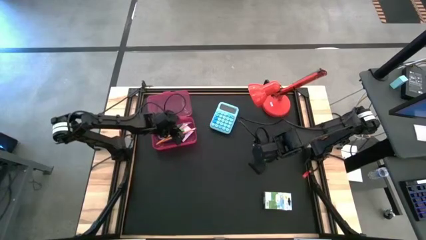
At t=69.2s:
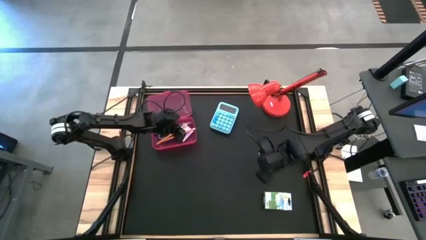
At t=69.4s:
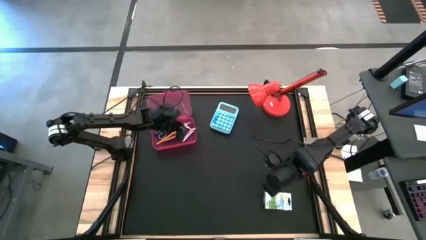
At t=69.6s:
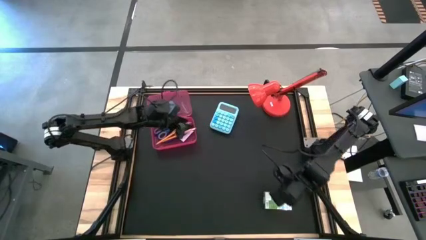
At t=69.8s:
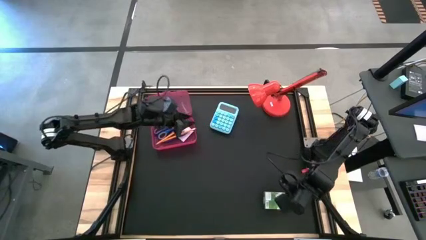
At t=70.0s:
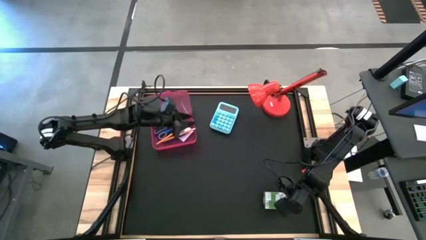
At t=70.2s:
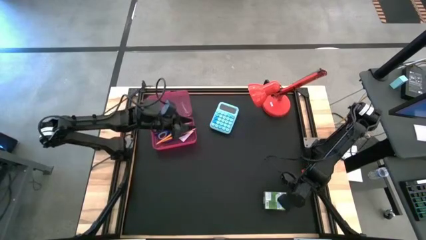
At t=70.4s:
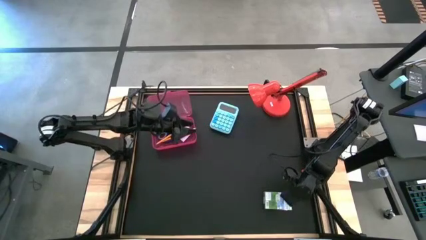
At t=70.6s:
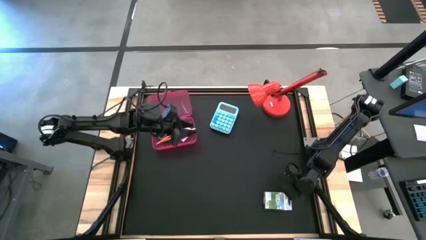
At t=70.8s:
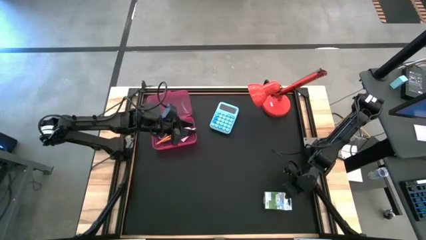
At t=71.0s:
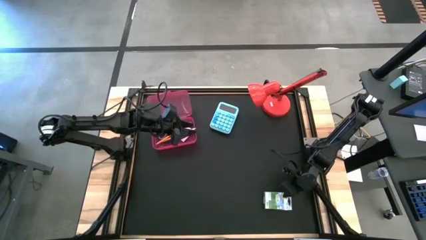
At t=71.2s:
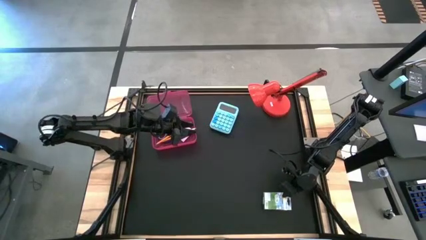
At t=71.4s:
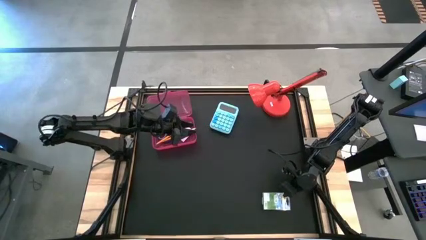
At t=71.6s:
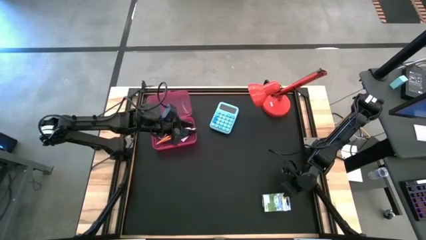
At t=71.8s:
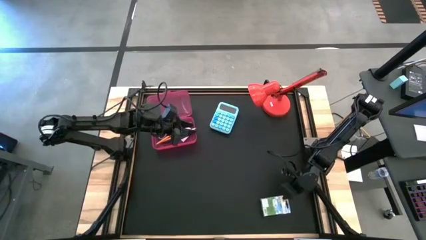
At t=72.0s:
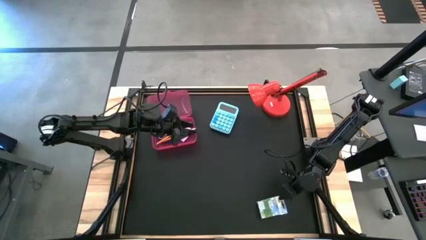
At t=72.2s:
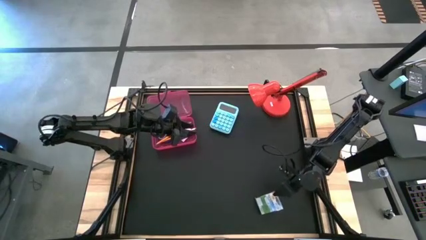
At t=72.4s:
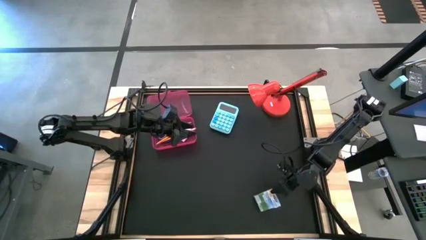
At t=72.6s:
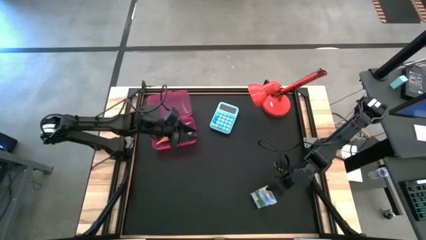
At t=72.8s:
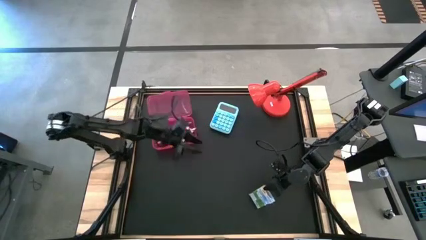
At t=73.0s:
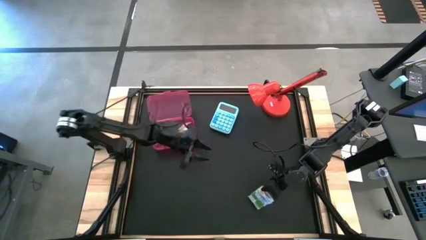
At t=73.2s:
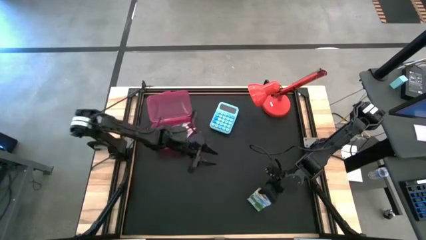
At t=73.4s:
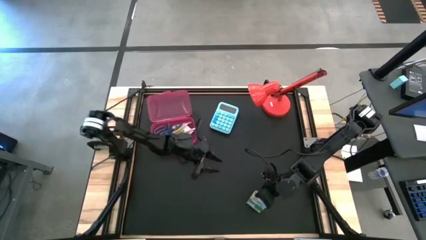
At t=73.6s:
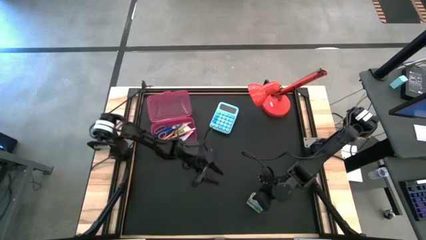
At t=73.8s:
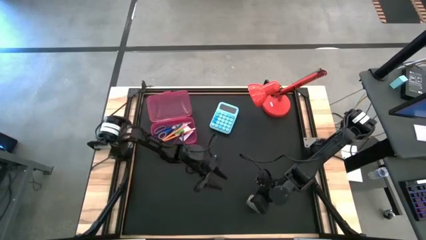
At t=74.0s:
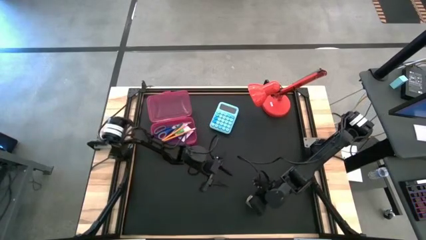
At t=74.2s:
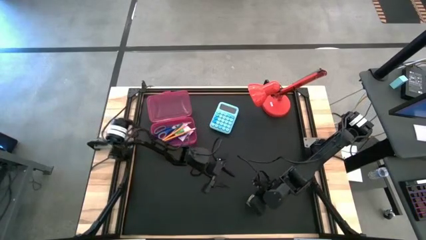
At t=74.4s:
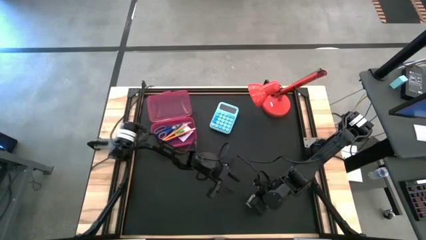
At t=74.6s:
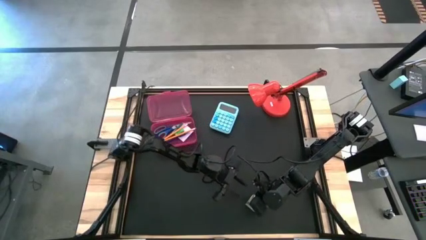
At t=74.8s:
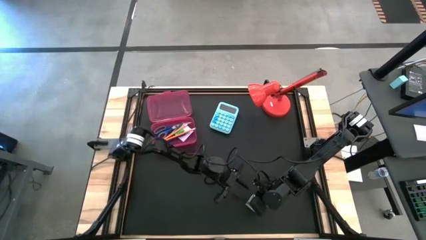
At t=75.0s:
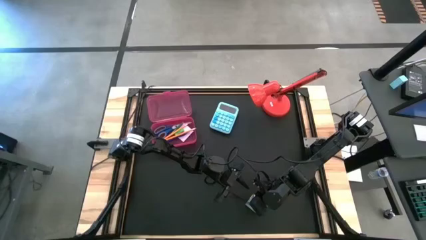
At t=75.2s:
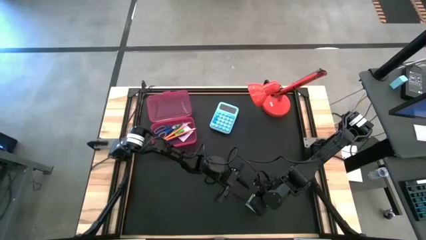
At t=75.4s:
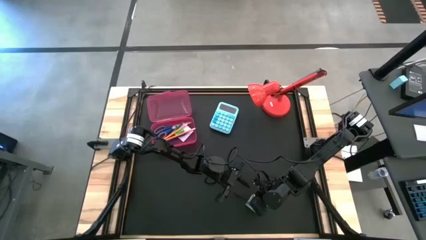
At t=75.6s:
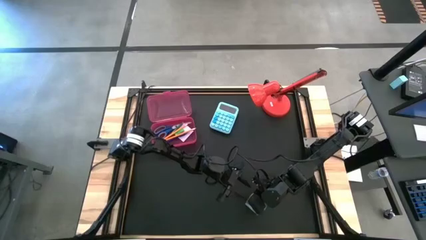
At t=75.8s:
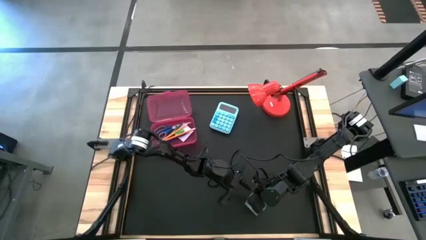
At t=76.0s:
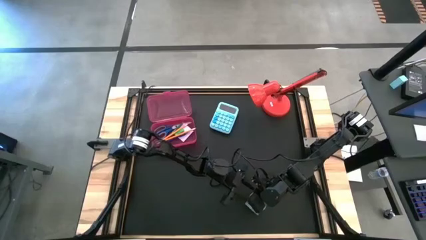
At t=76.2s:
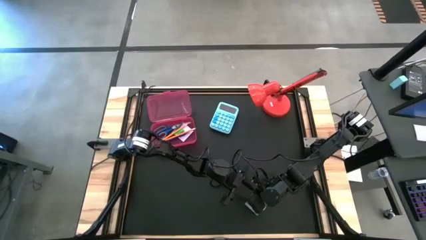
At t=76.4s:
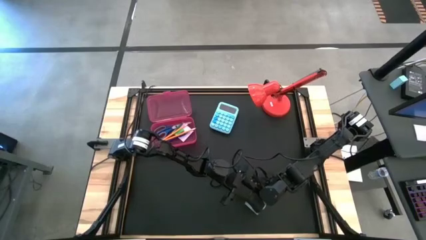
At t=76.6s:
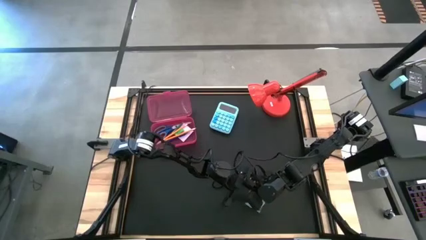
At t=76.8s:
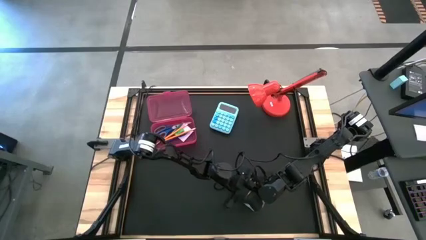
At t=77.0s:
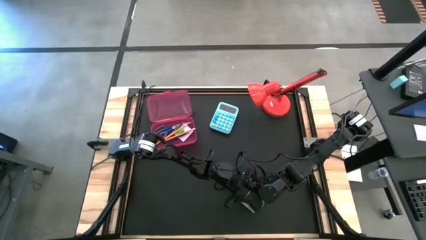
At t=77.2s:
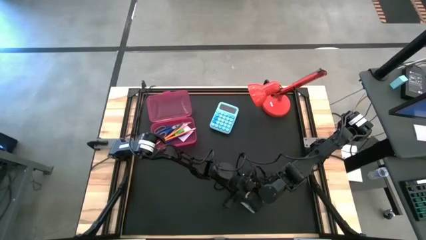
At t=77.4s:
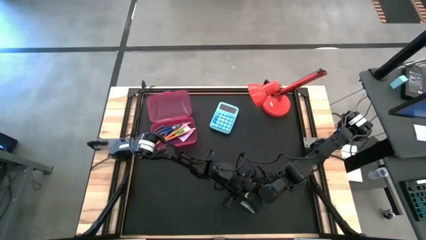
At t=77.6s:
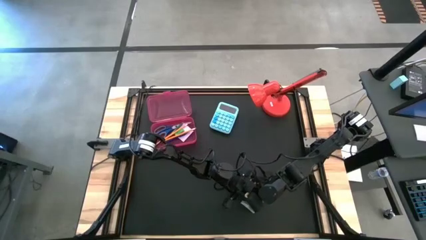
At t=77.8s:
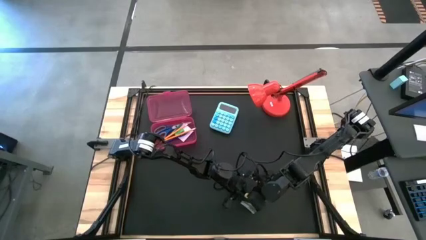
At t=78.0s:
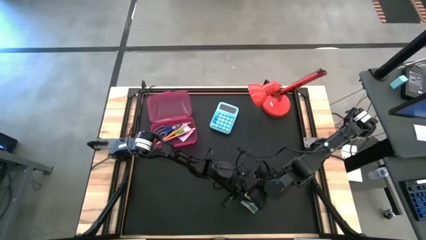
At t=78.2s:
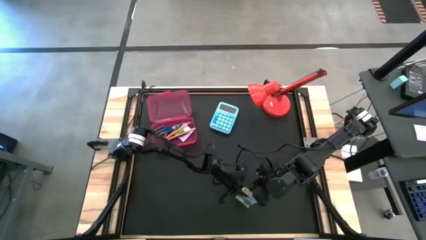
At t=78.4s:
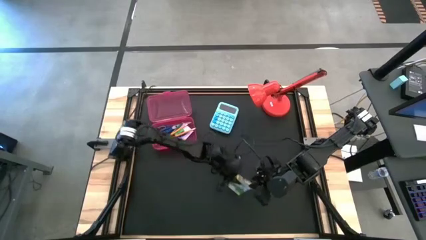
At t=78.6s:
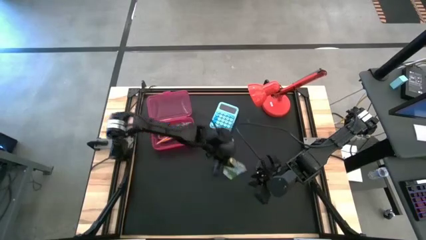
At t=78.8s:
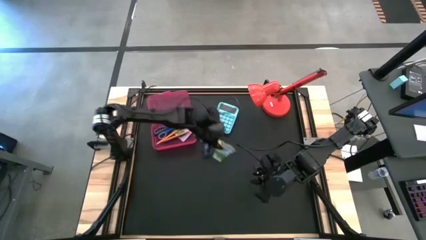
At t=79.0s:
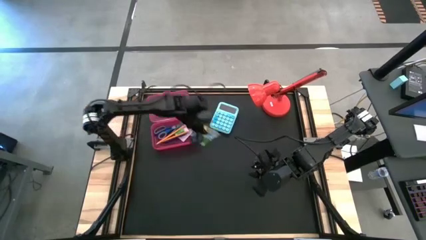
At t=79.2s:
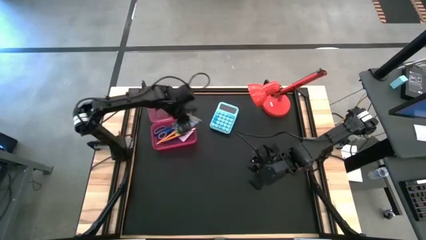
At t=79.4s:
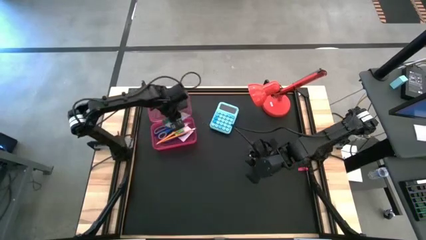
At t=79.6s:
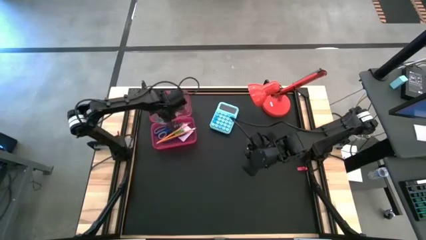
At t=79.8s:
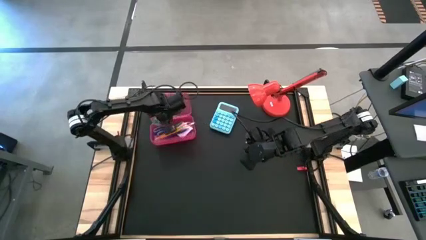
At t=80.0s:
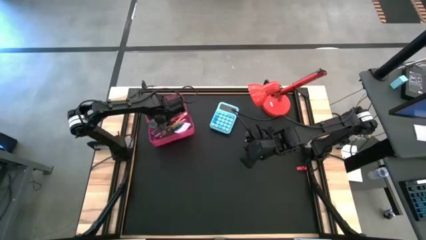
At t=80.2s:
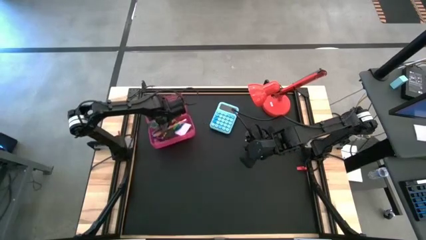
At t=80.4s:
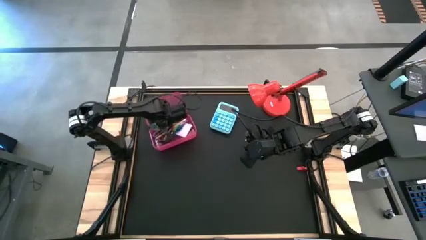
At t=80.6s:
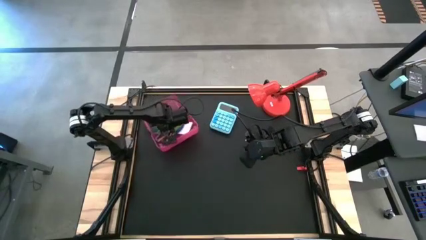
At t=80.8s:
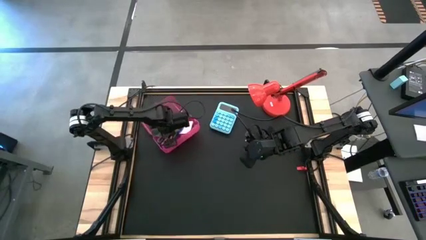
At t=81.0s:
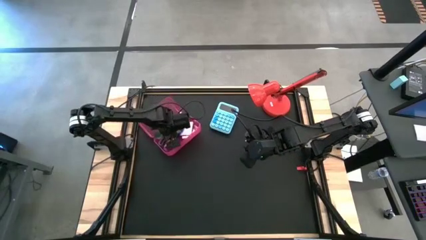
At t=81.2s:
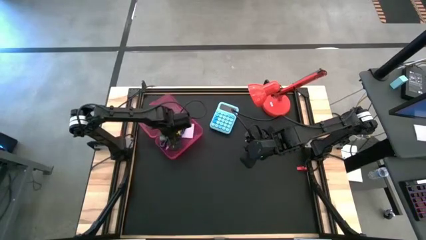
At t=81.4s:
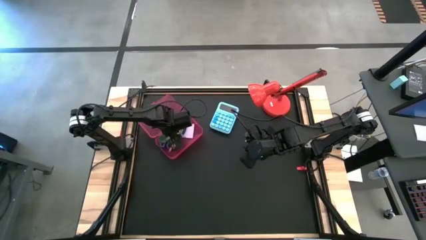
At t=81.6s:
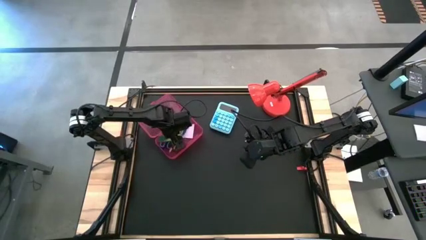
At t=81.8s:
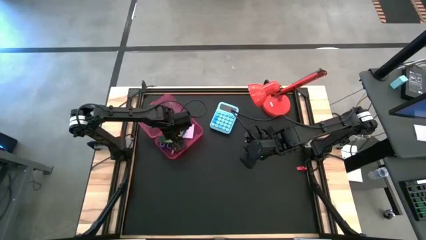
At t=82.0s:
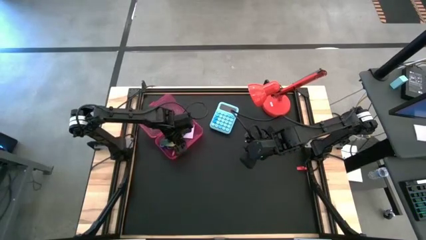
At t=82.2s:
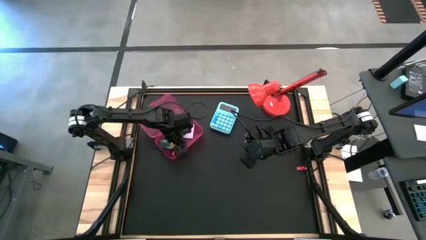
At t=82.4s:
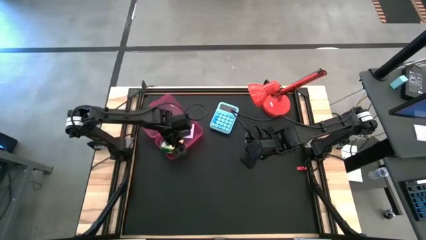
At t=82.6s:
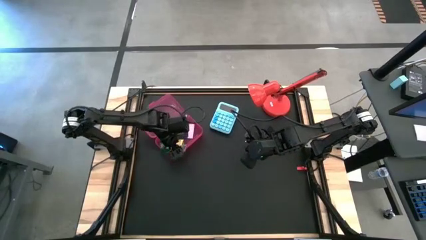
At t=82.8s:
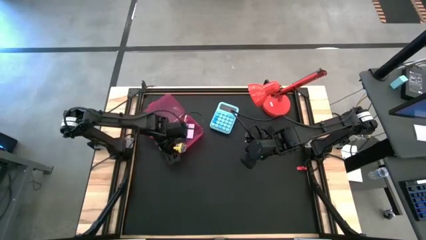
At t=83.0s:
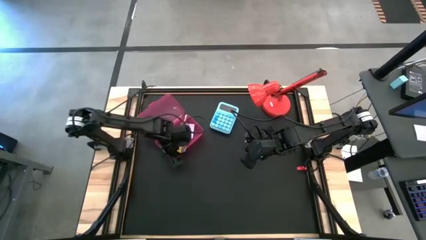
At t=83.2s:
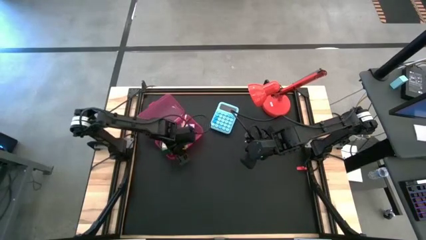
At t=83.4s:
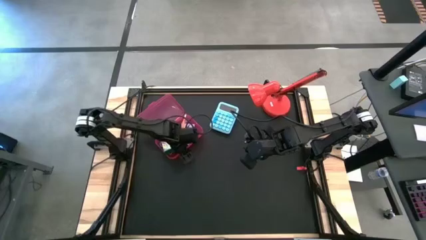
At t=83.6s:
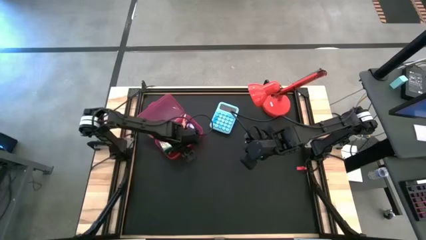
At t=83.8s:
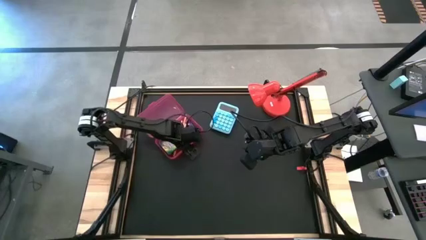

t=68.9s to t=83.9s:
Task: Pack school essentials
Put the yellow crayon box into the pink supply box

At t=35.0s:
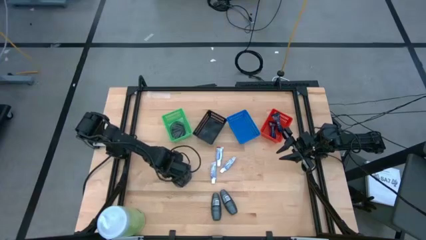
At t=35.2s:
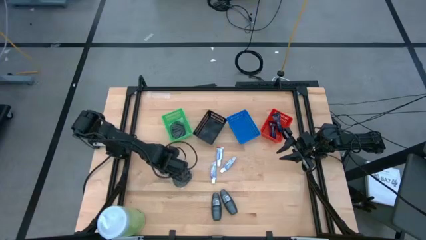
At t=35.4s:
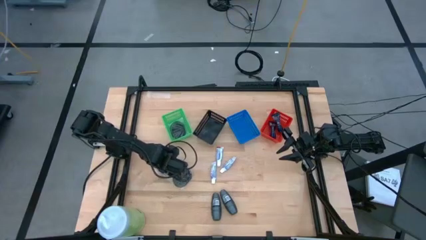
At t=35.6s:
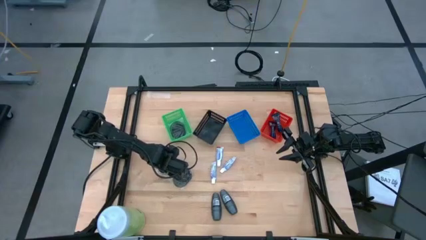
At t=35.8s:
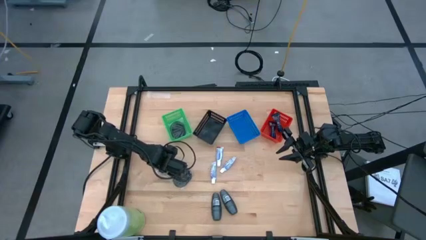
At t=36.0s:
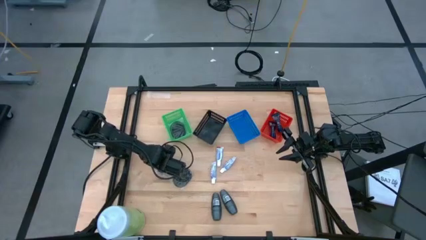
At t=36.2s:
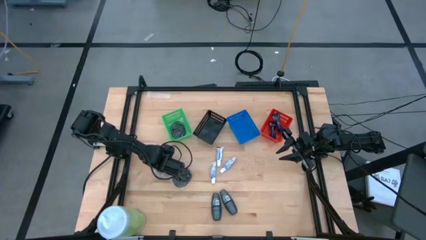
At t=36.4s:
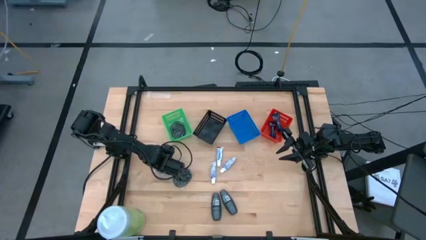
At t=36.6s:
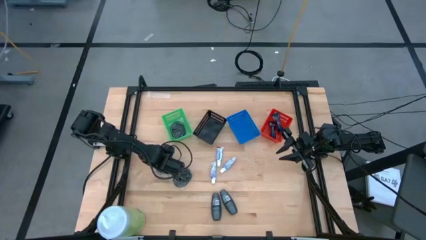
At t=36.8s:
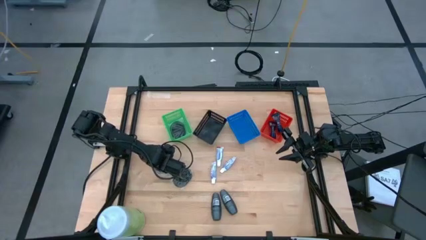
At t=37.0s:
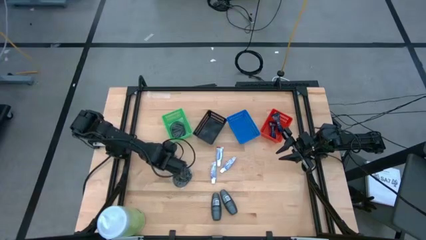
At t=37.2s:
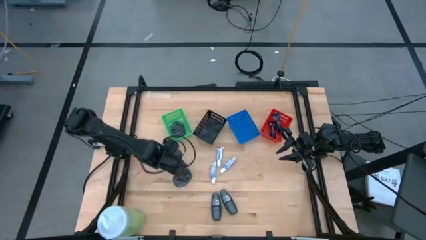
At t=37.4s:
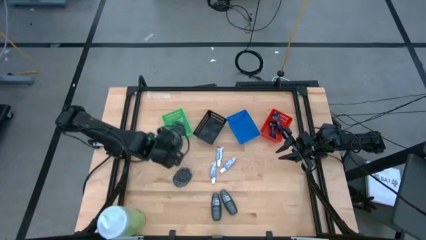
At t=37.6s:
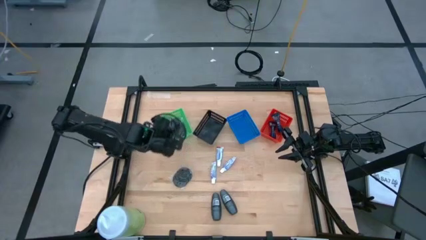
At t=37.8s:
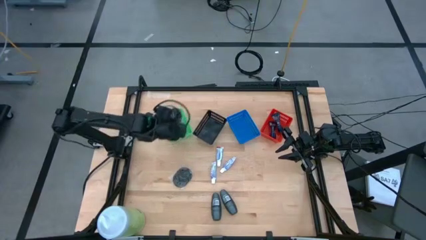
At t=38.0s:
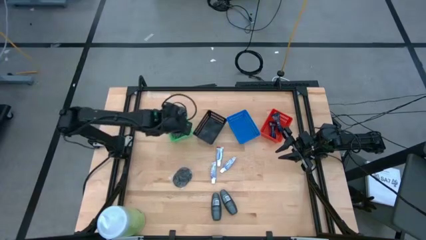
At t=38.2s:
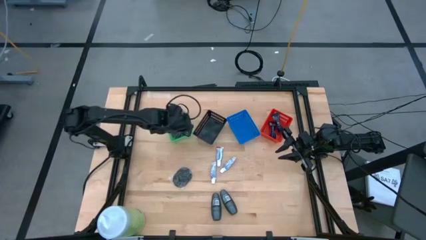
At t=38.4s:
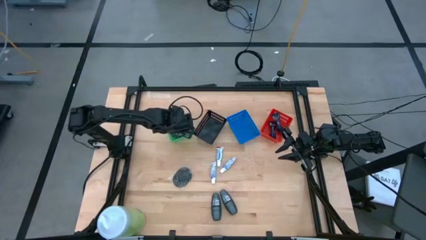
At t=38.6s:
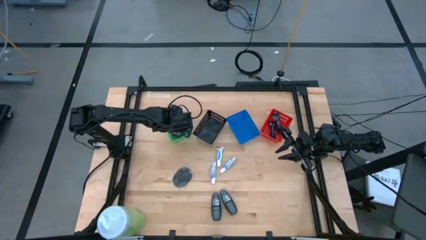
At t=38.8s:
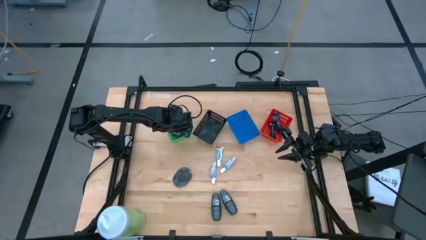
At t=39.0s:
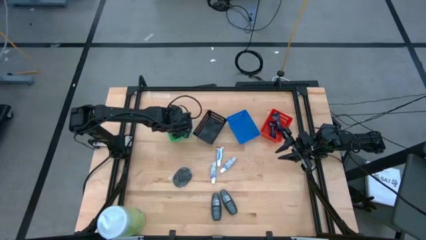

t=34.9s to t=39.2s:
Task: Pick & Place Travel size toiletries
Put the left black hairbrush into the green bin
